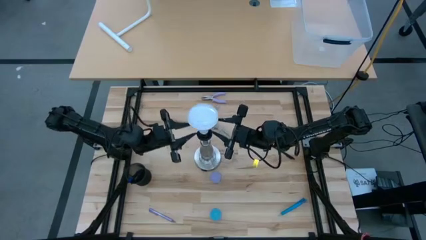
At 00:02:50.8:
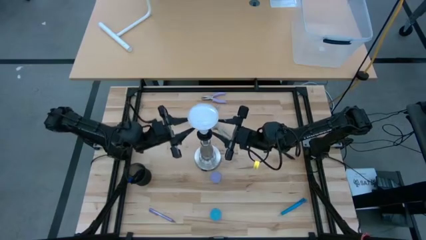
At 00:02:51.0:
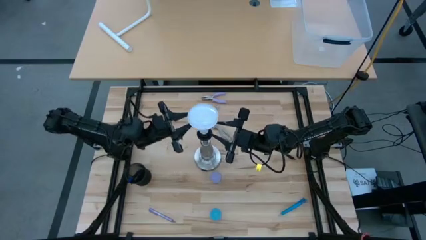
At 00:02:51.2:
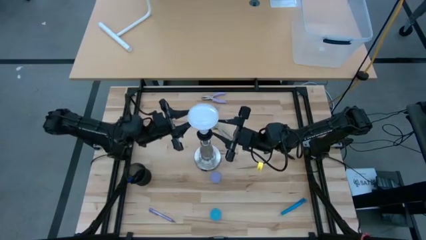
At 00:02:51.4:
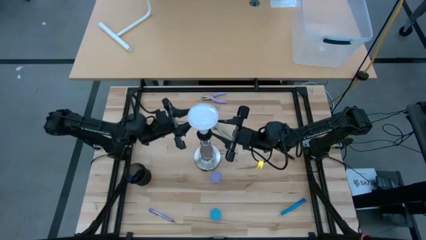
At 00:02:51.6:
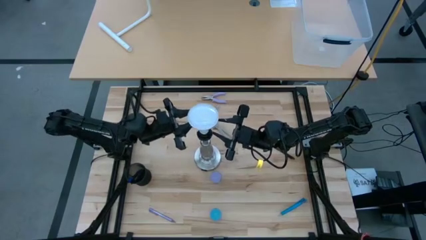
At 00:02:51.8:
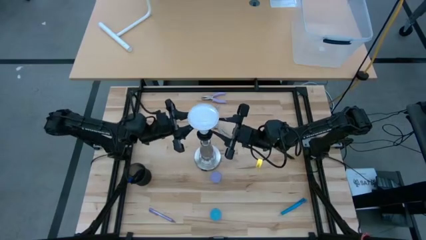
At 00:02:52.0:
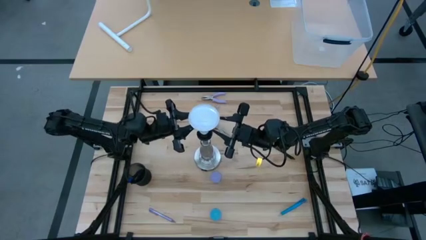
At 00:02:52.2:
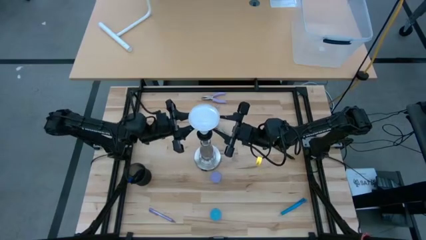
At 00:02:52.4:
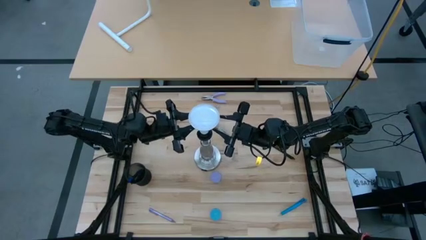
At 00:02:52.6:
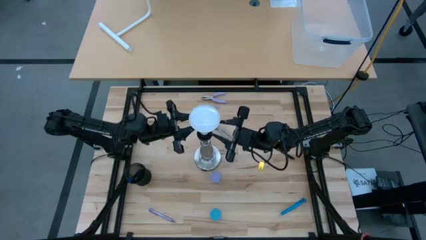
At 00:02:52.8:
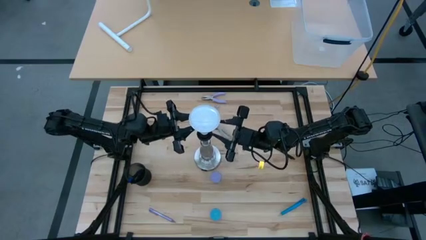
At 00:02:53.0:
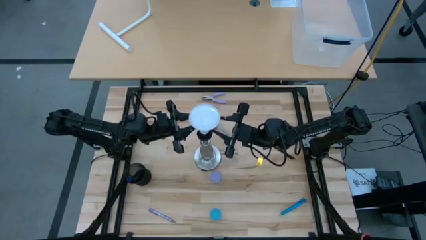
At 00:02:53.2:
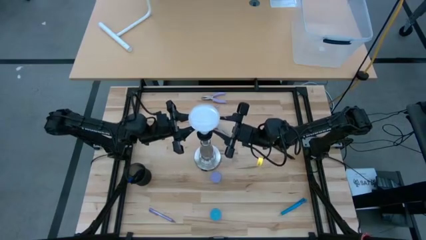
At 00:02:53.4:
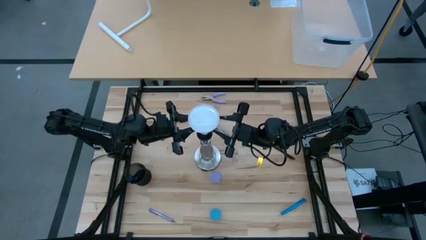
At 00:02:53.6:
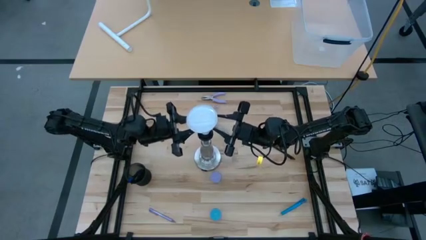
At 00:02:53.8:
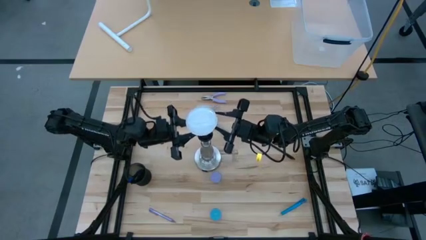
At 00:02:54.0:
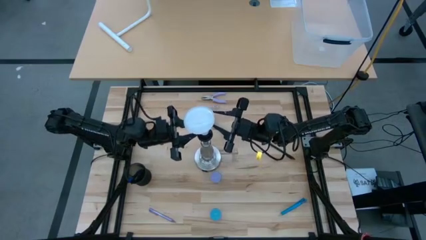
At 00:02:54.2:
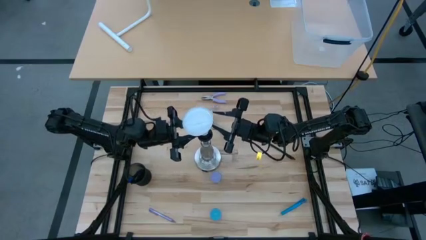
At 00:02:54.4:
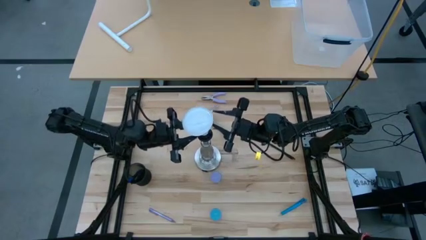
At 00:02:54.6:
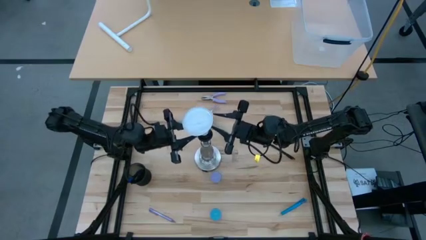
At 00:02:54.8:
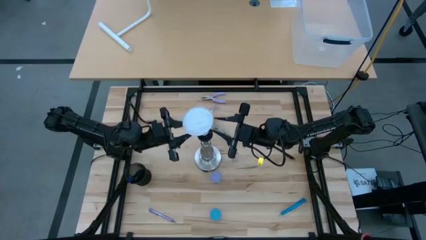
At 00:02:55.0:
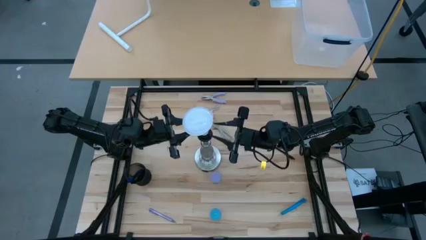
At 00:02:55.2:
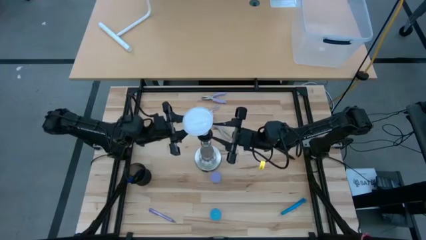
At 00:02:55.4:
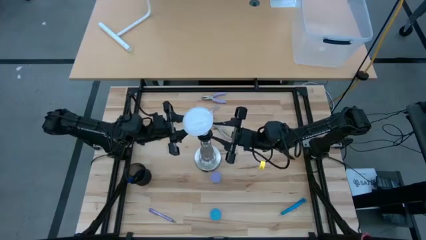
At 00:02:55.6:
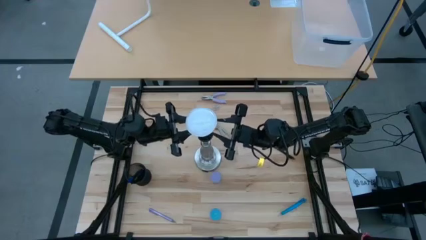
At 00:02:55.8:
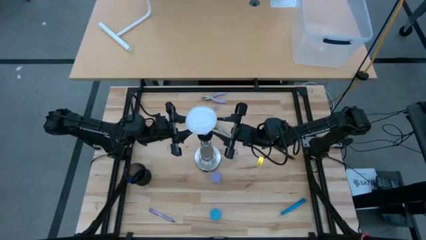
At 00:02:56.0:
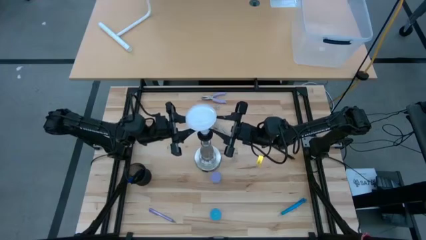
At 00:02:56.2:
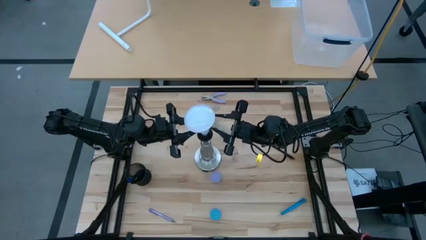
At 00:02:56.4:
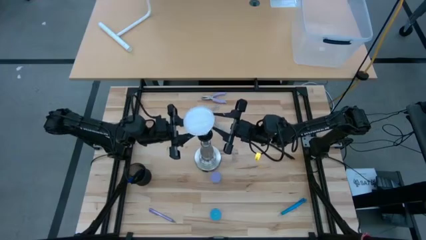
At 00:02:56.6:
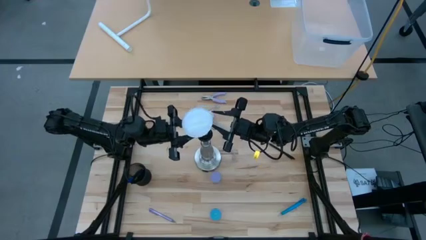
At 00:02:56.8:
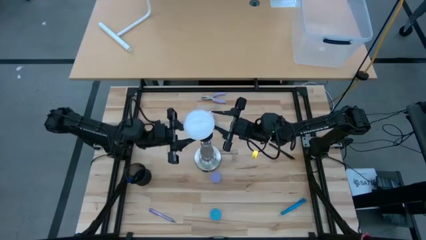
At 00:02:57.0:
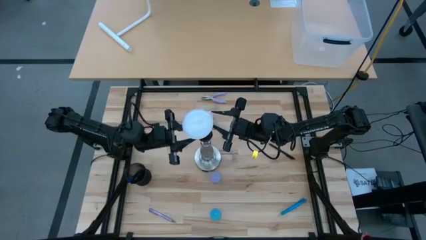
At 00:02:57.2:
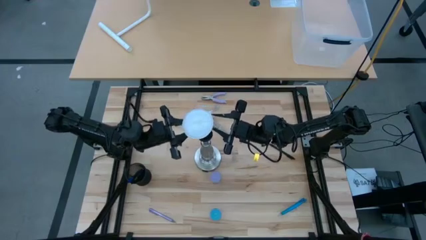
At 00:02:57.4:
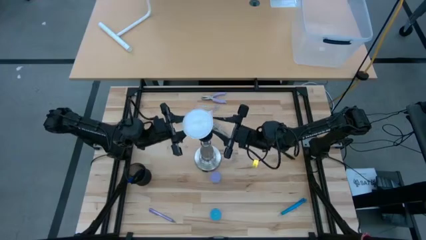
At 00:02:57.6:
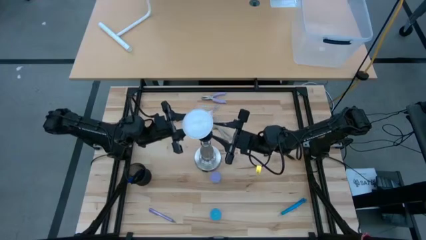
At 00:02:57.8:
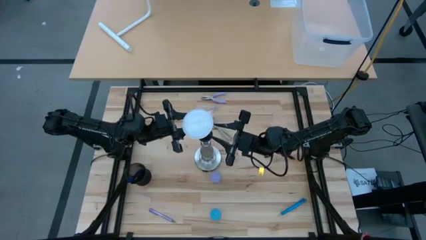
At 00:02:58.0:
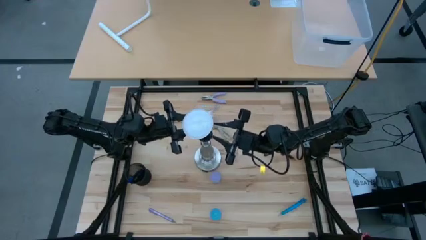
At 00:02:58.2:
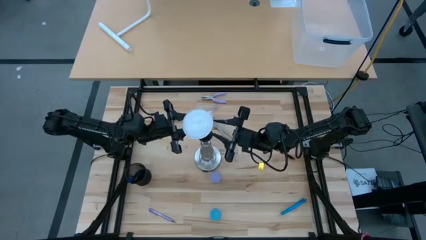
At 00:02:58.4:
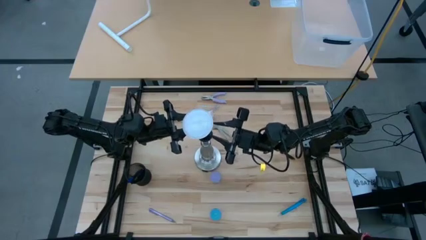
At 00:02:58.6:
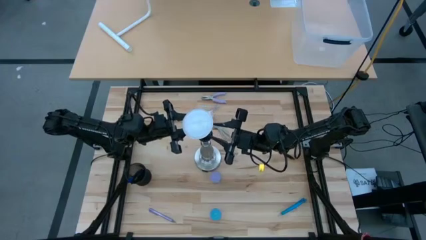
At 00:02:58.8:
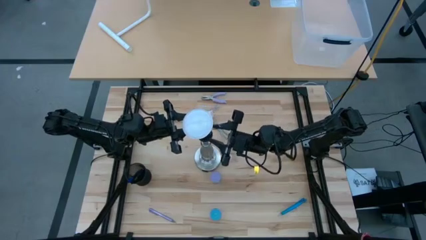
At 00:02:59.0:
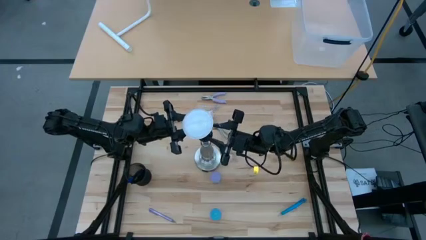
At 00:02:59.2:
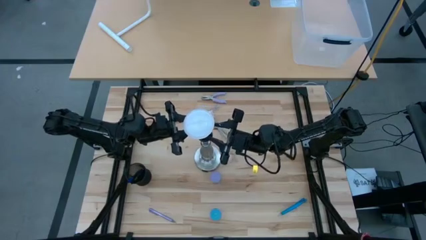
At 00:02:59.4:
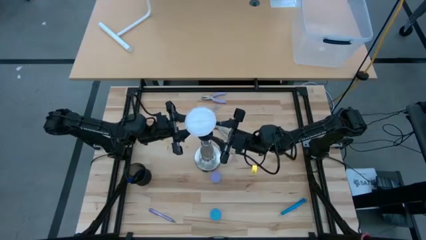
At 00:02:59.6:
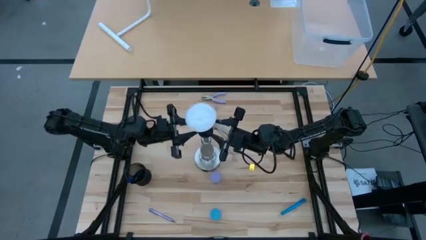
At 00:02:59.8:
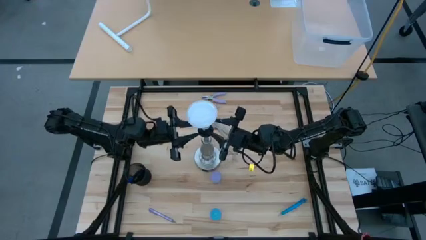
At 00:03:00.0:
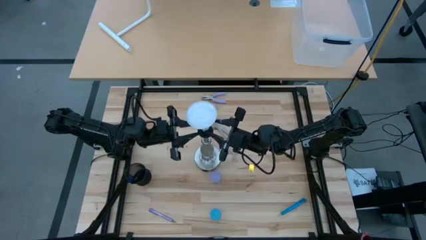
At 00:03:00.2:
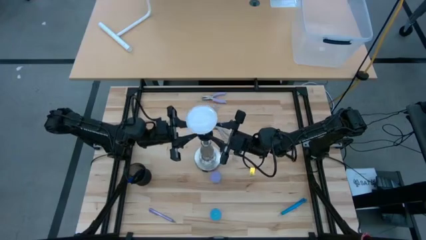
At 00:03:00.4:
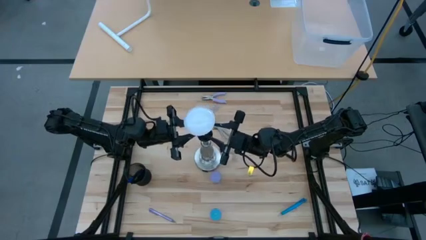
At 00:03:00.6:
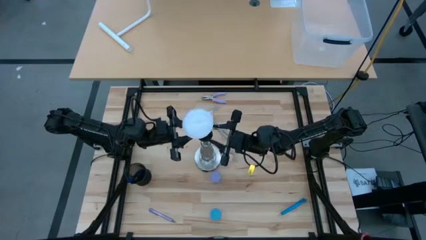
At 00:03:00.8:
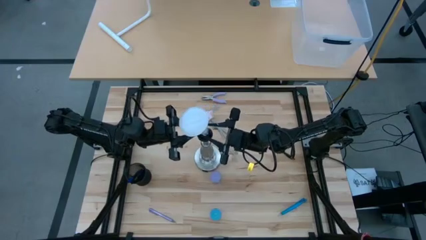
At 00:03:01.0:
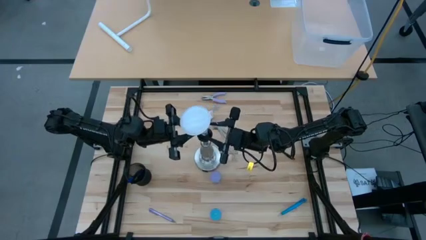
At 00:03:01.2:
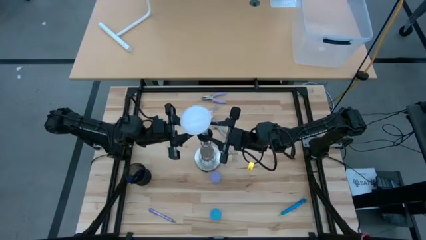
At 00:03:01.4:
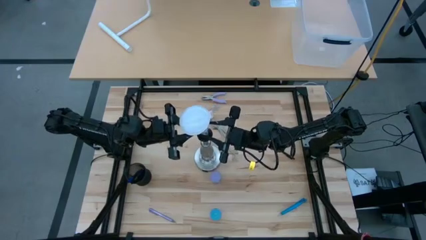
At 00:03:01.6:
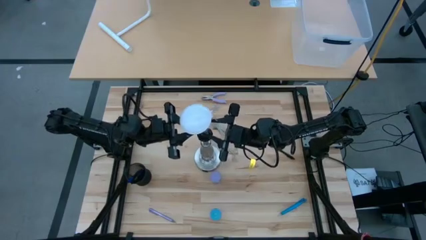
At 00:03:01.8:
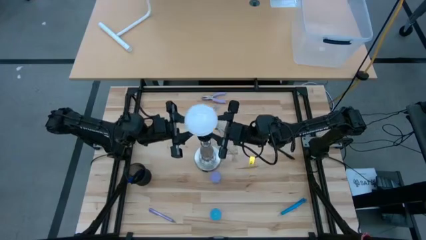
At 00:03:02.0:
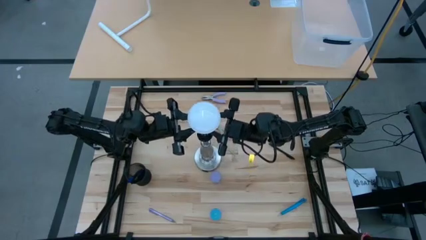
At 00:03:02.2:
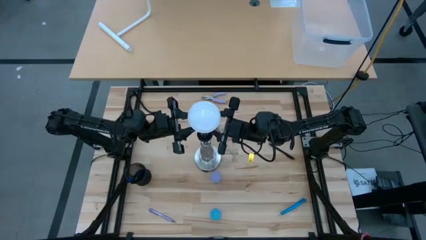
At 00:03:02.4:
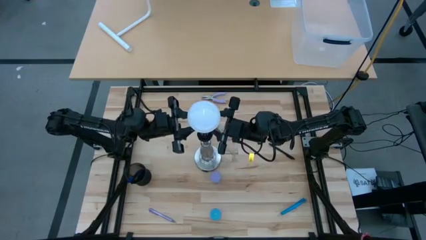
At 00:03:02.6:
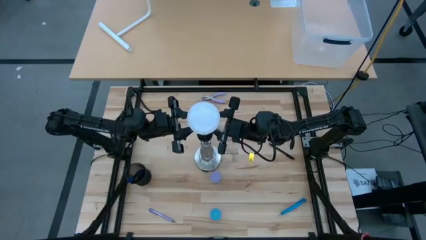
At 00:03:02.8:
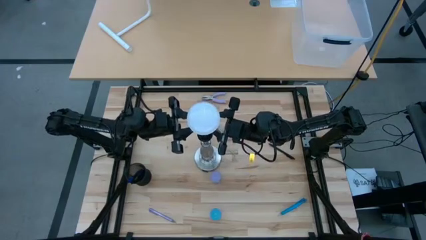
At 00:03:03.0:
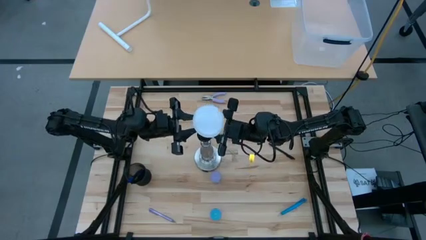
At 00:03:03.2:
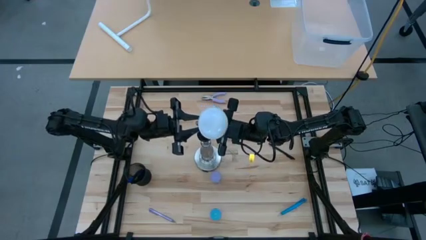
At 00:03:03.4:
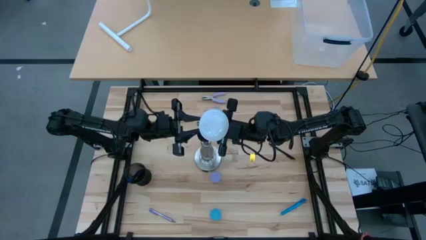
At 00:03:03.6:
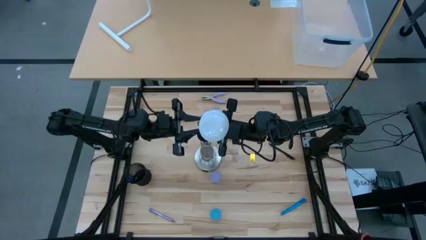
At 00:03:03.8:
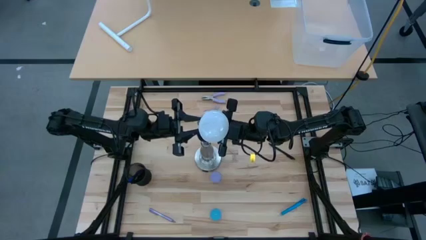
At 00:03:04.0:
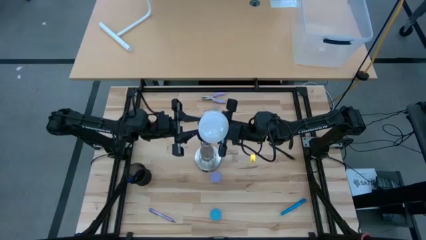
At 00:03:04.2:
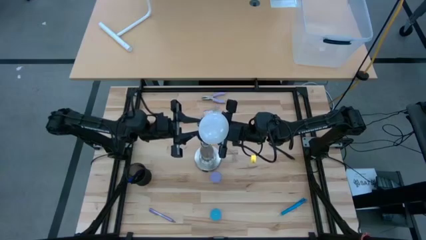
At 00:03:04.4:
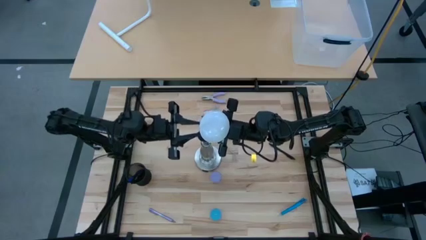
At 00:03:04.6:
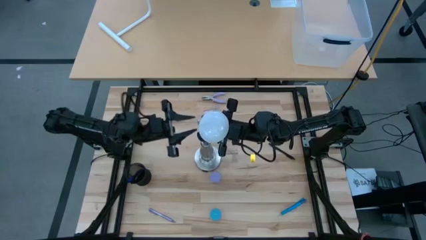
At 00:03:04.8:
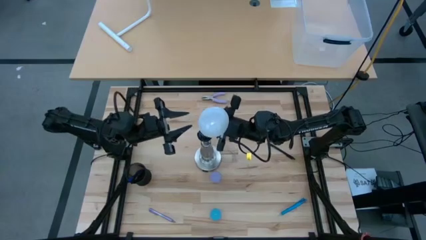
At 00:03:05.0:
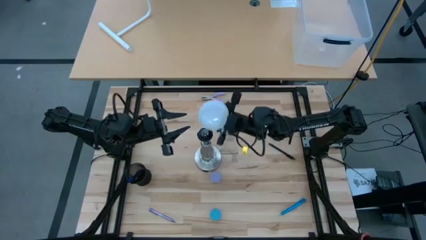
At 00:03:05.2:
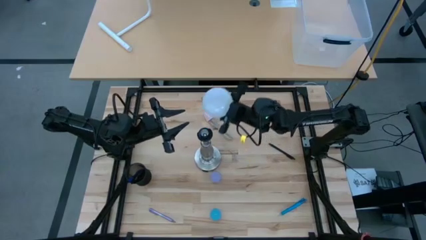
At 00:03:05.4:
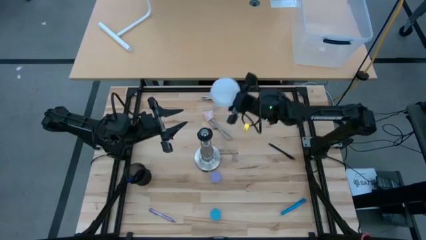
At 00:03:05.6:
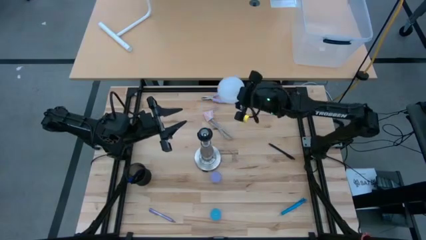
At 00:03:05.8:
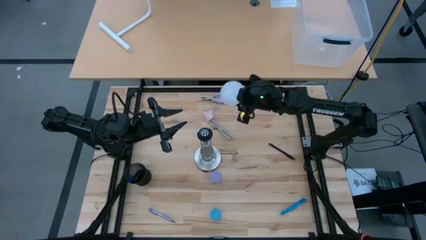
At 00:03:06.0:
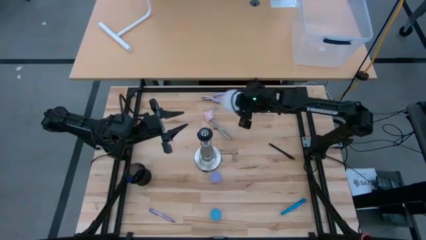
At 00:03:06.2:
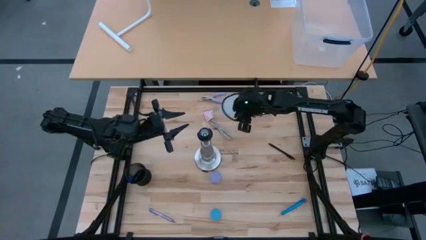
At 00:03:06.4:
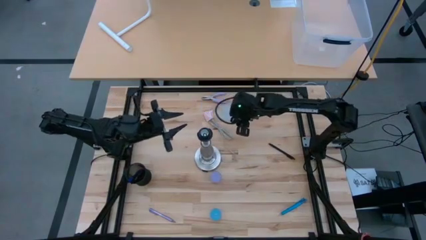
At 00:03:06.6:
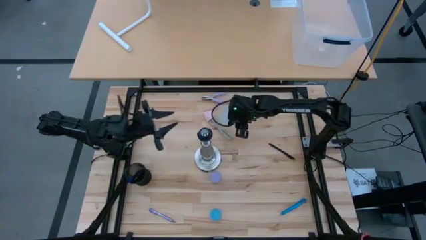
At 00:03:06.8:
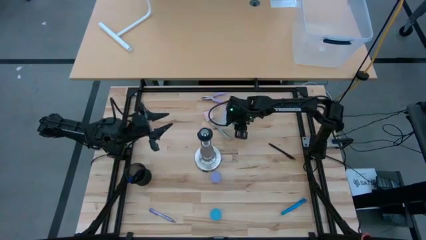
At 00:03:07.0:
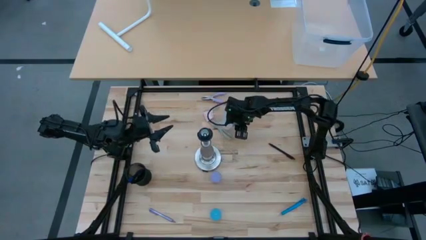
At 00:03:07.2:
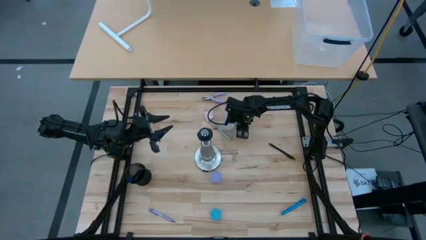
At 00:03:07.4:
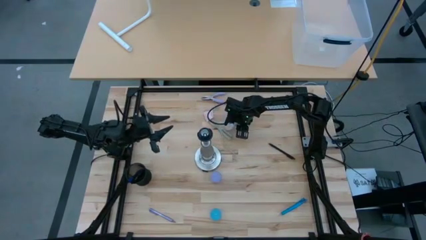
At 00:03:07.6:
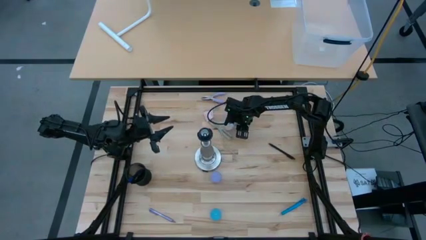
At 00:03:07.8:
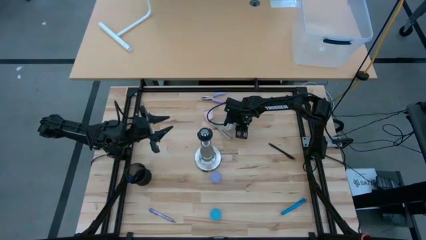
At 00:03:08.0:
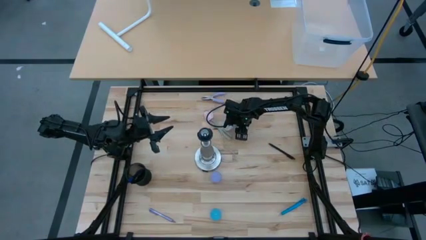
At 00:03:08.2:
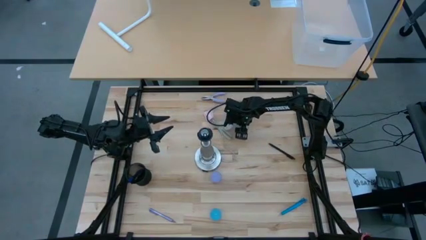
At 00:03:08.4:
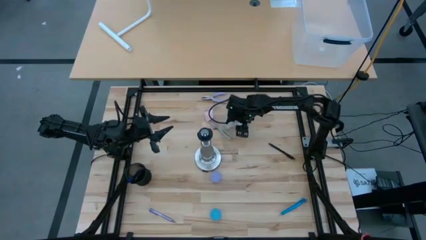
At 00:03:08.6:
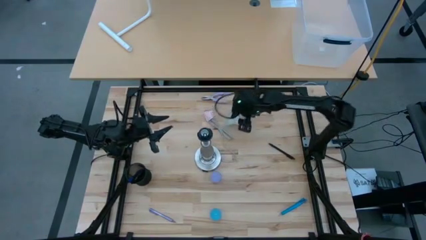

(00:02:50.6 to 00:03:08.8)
Task: Screw lightbulb
Remove the lightbulb from the silver lamp socket
